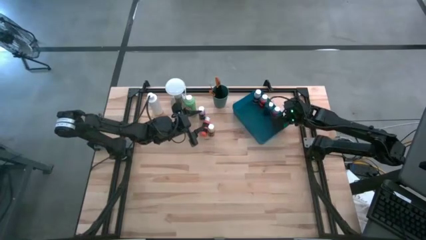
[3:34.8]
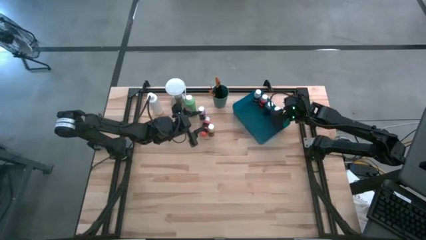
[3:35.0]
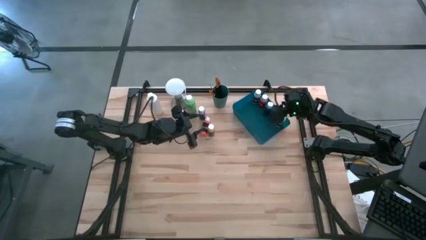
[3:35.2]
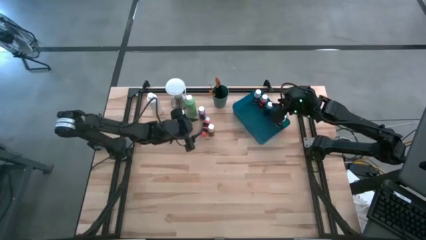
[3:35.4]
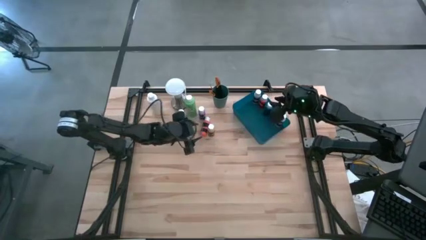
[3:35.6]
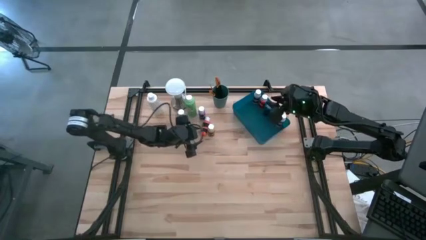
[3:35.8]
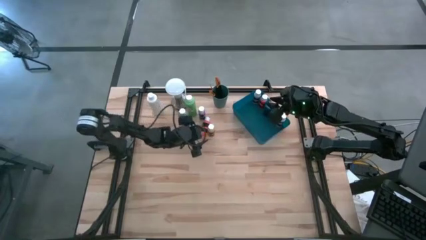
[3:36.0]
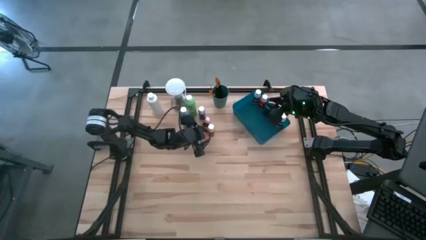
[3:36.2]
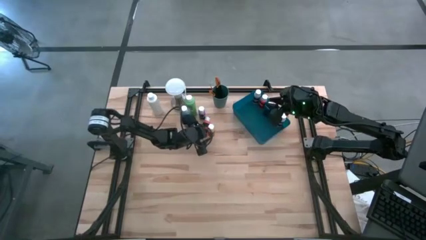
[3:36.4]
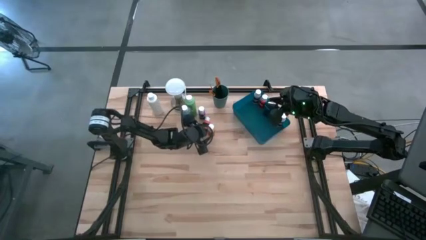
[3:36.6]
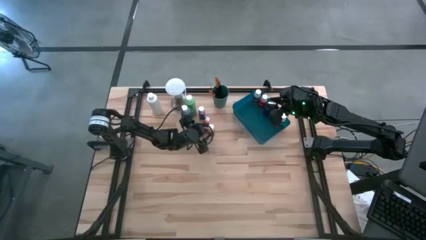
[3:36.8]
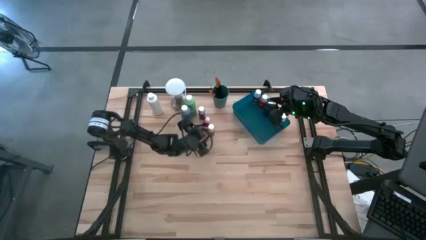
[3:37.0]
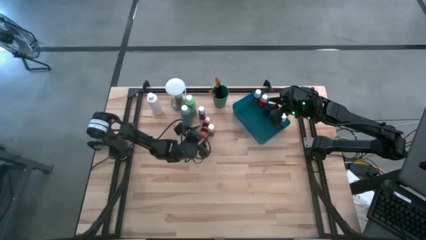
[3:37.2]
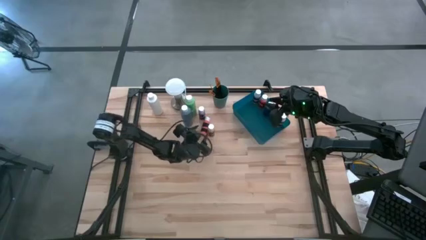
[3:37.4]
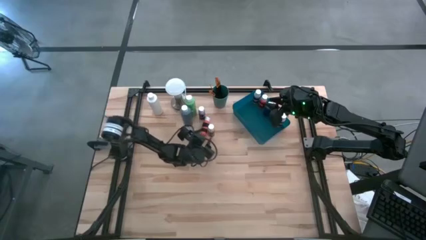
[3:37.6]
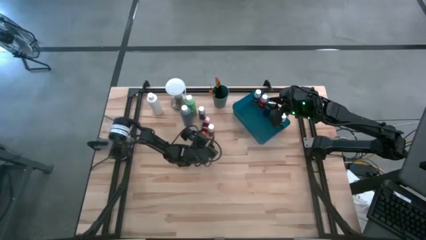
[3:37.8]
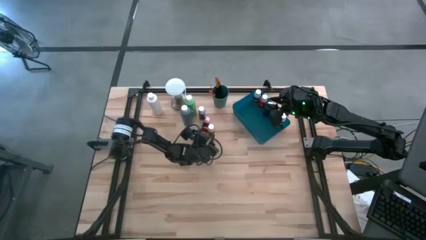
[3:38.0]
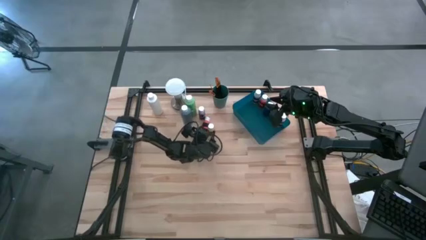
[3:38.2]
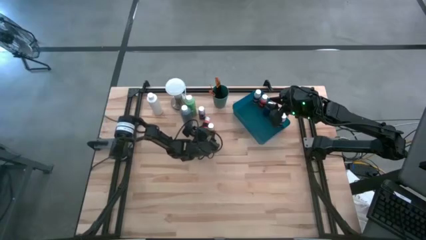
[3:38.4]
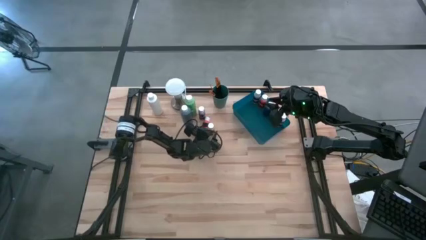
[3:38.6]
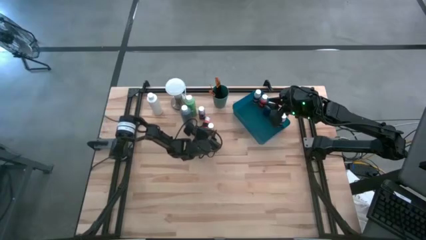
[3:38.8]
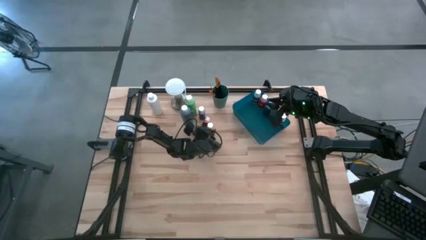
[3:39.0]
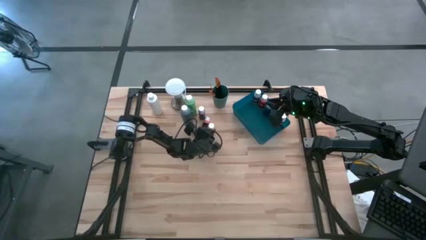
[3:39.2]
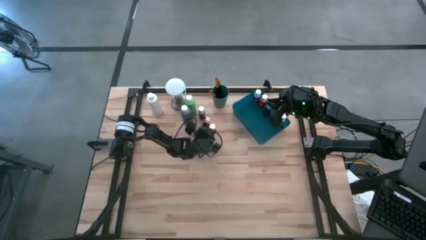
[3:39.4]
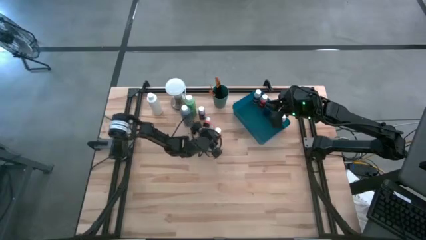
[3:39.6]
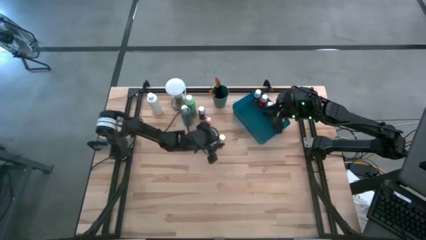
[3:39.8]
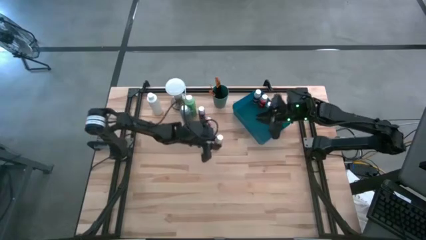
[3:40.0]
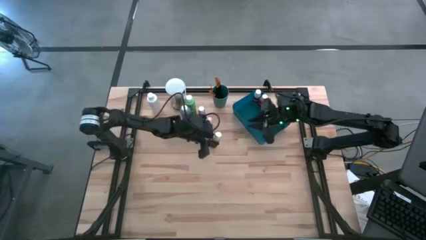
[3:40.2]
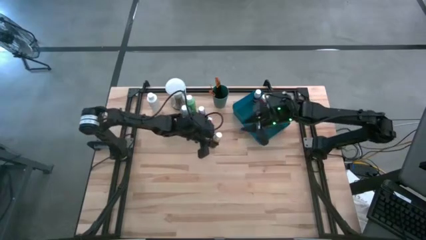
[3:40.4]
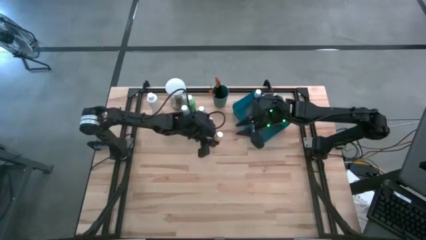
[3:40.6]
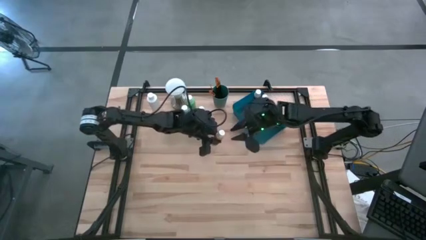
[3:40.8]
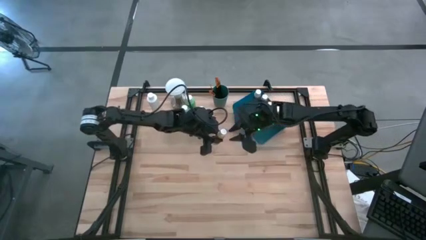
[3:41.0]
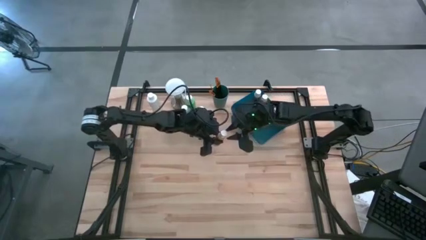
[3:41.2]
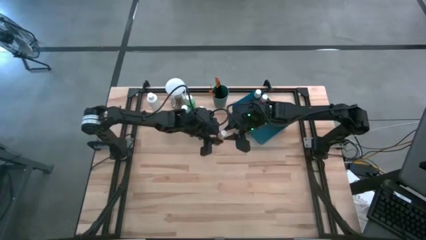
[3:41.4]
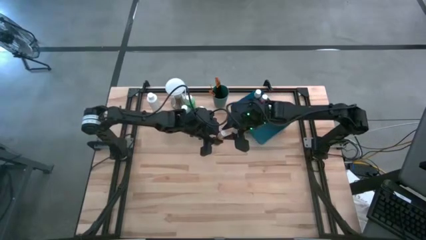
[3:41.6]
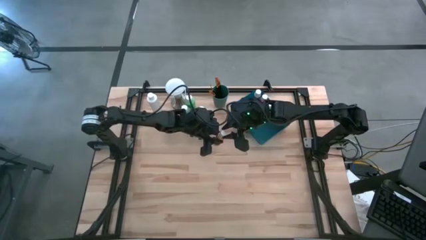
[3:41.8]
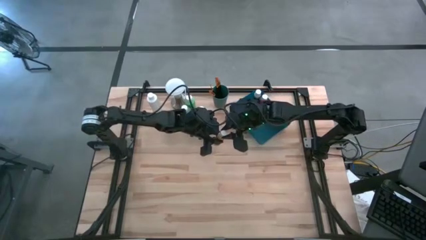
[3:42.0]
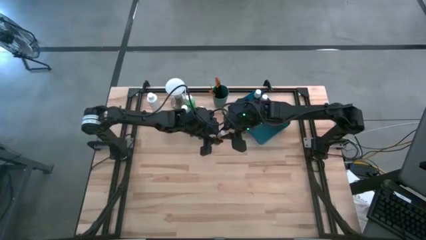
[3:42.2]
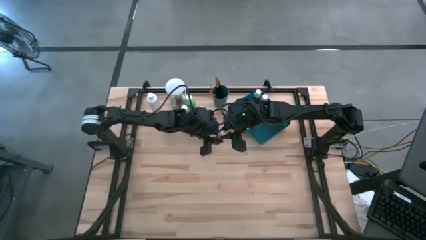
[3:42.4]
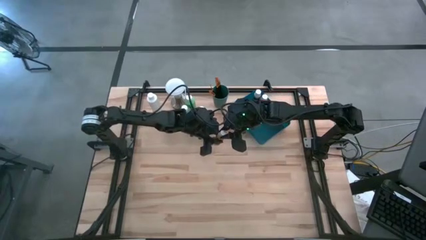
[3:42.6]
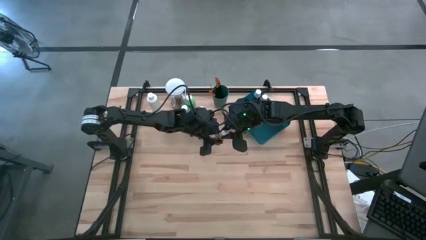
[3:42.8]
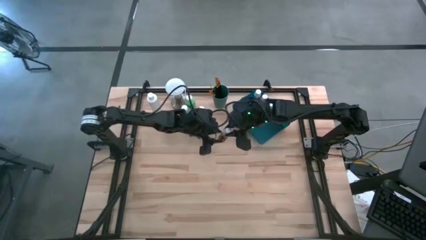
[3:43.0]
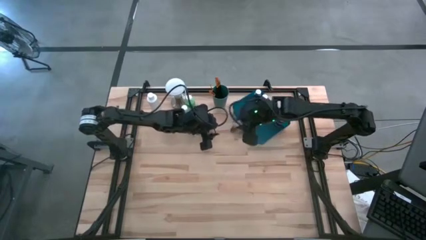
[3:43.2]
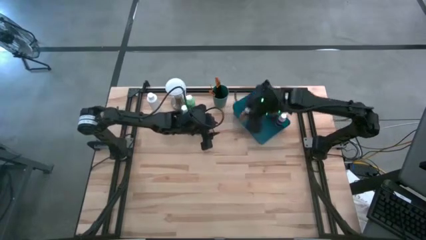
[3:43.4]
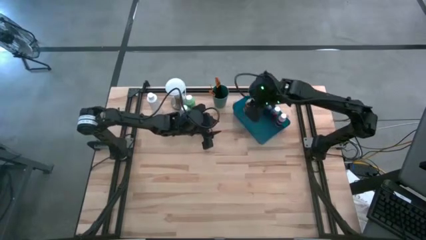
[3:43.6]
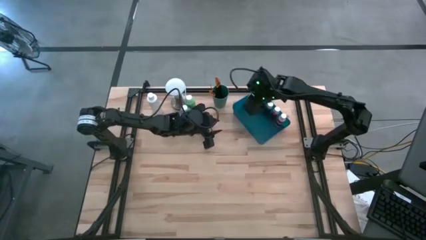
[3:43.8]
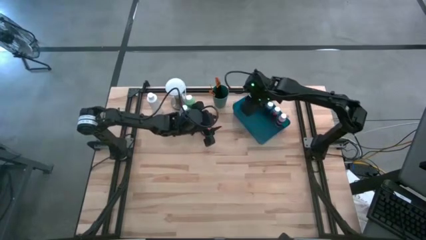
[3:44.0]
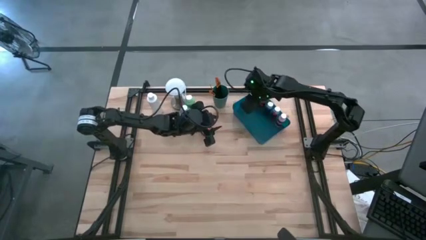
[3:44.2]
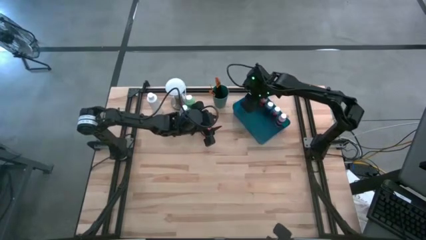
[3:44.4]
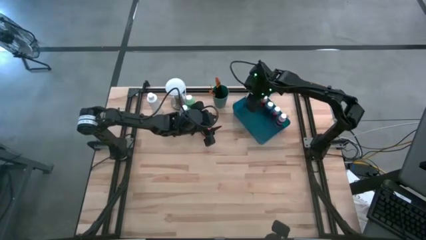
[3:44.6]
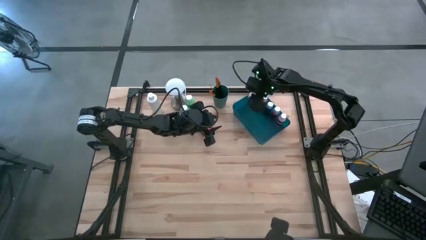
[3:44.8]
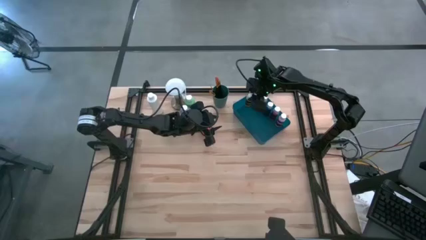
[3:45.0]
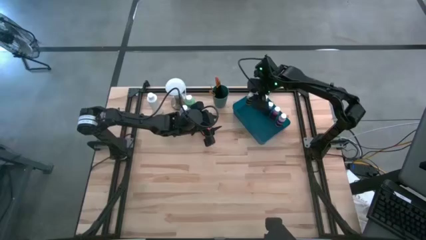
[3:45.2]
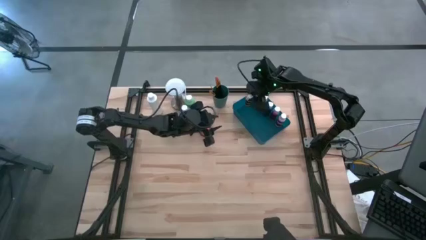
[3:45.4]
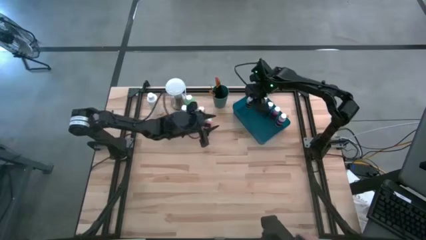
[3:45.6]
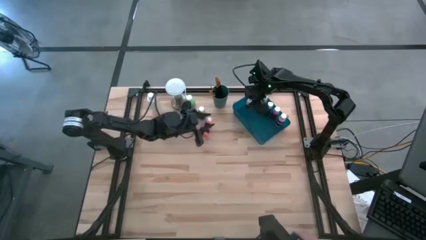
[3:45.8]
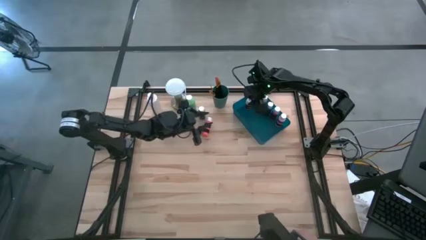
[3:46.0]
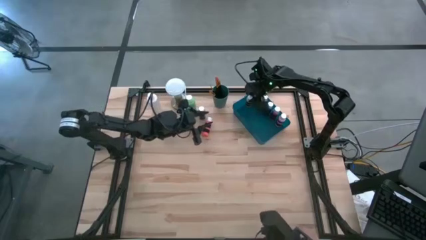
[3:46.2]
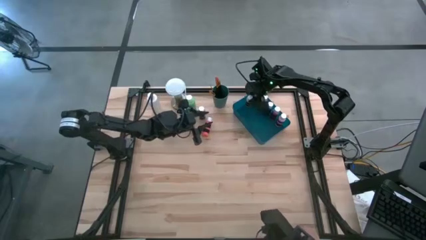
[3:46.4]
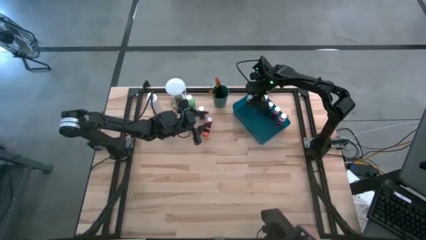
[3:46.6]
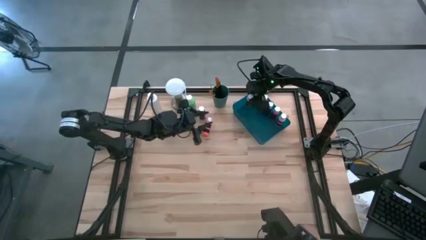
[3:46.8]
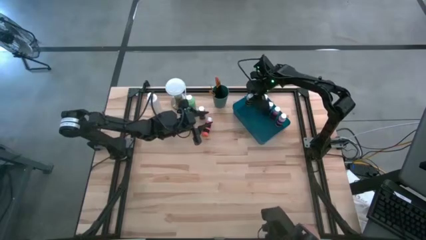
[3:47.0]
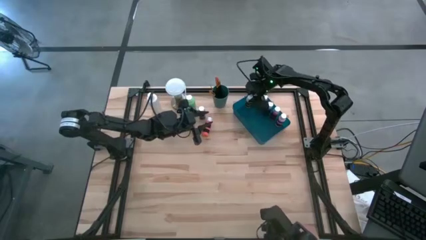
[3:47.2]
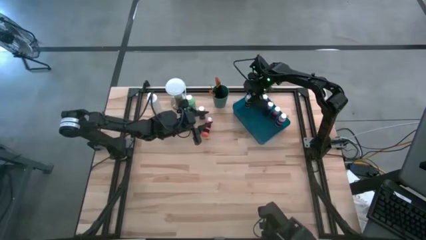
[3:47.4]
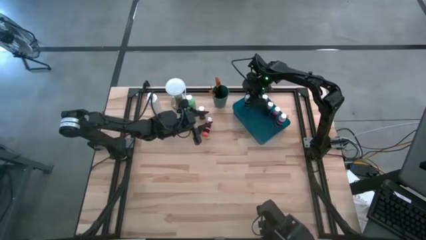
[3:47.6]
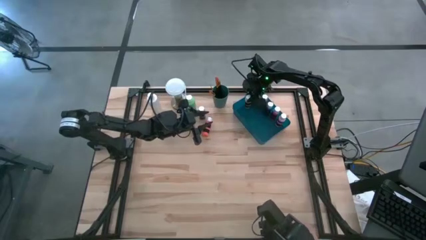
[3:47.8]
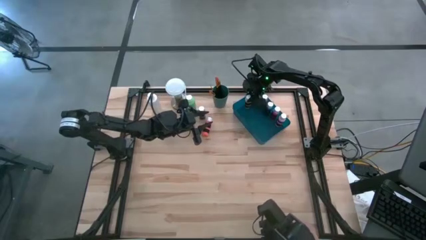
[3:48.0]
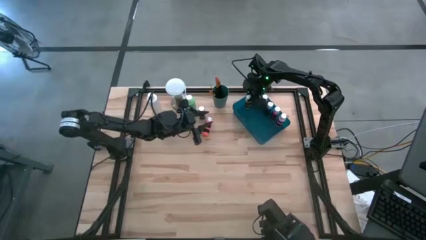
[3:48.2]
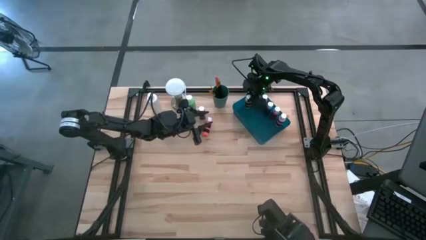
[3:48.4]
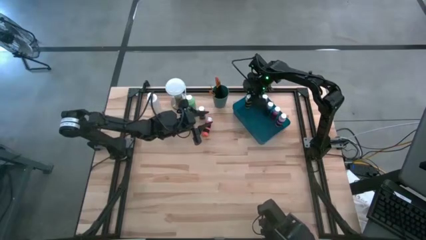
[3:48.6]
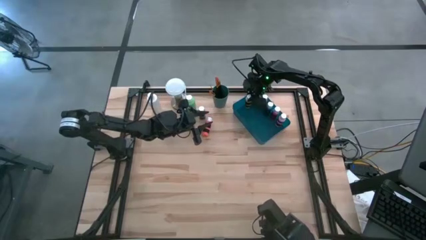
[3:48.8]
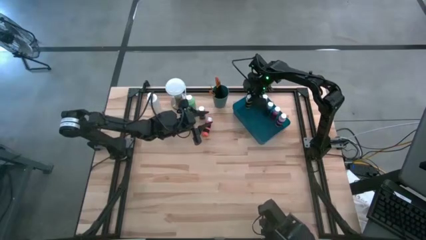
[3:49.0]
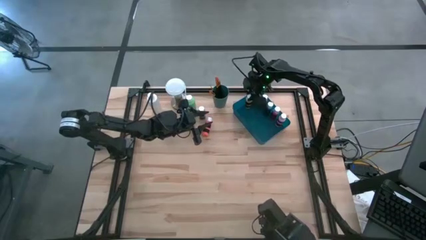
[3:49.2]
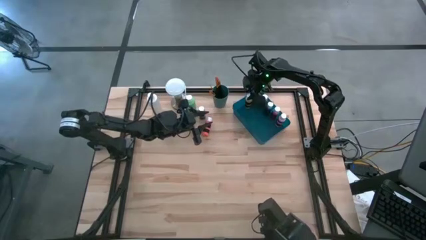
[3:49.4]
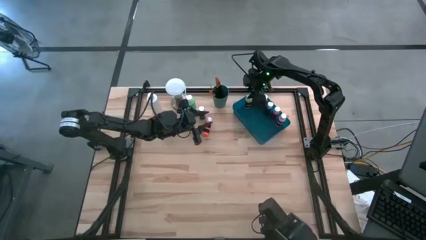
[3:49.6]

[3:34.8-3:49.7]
Task: Pick & Place Paint Supplies
Put the yellow paint bottle into the blue bin
